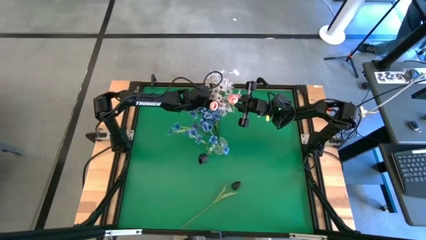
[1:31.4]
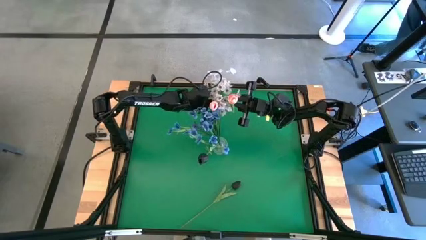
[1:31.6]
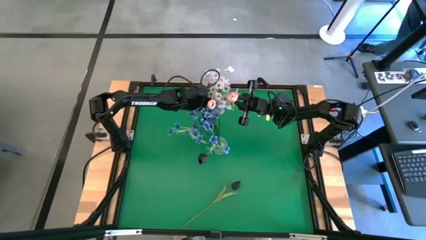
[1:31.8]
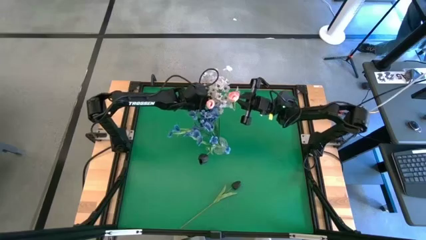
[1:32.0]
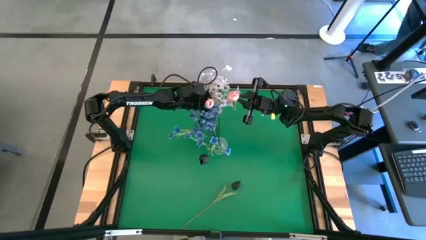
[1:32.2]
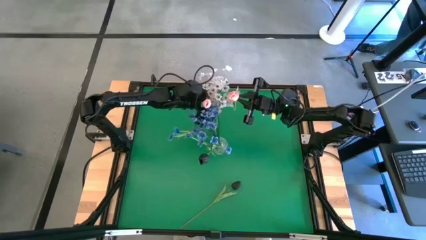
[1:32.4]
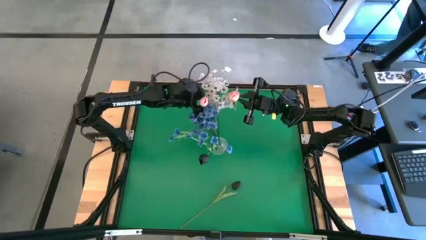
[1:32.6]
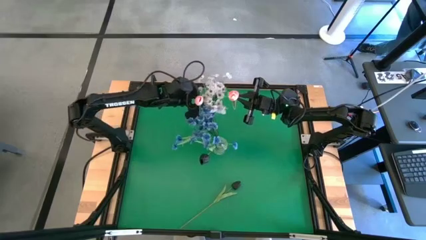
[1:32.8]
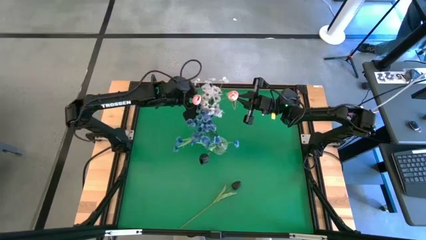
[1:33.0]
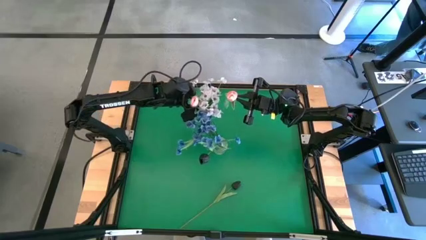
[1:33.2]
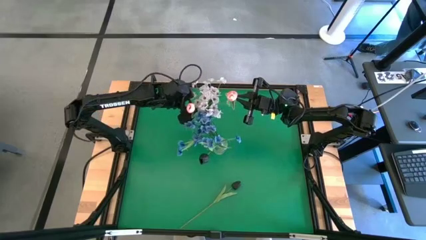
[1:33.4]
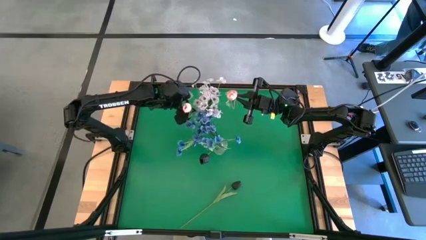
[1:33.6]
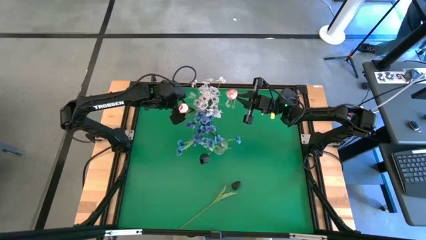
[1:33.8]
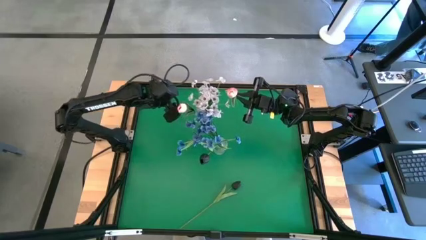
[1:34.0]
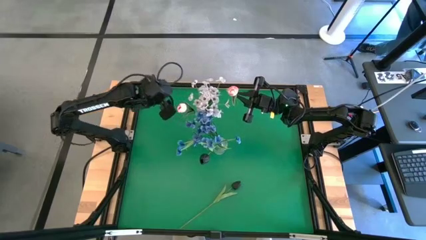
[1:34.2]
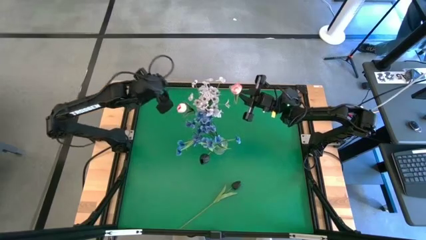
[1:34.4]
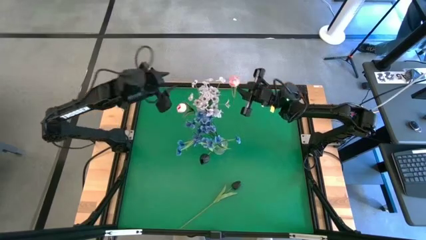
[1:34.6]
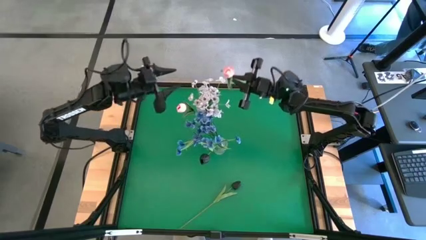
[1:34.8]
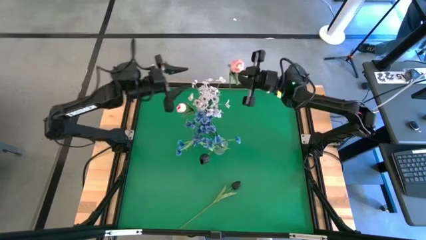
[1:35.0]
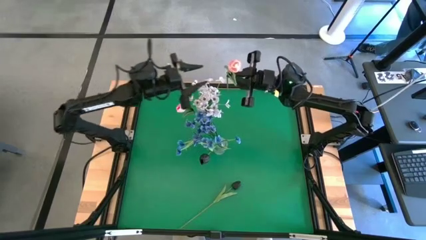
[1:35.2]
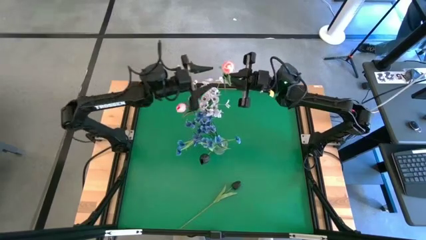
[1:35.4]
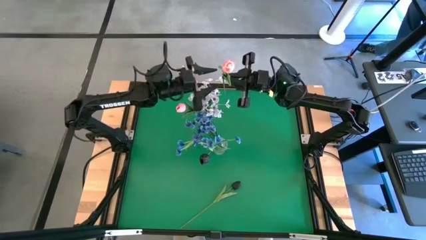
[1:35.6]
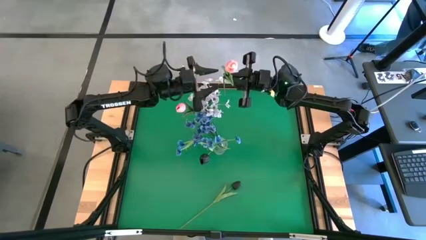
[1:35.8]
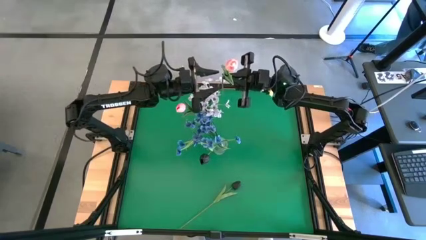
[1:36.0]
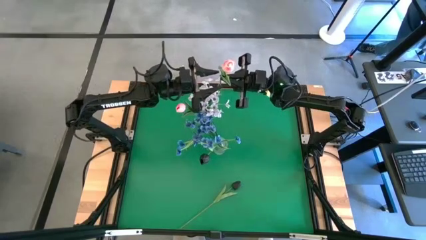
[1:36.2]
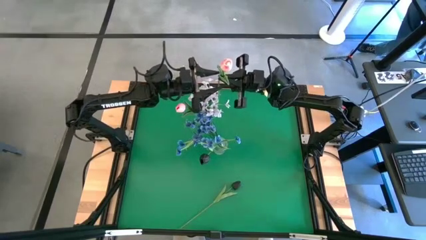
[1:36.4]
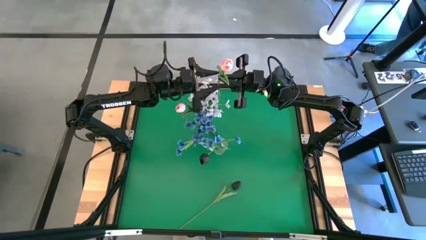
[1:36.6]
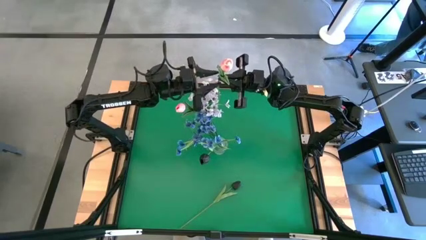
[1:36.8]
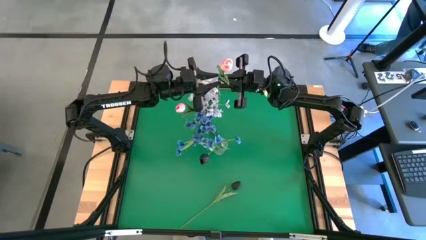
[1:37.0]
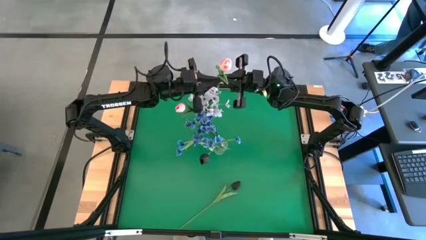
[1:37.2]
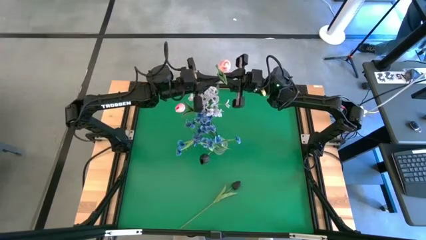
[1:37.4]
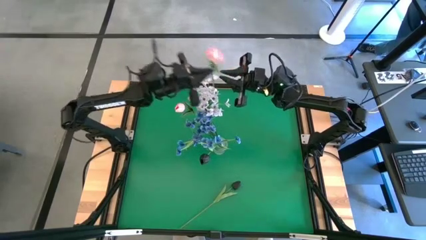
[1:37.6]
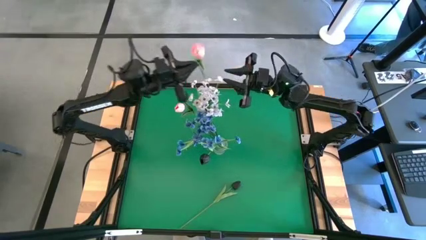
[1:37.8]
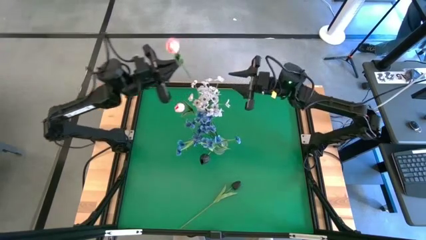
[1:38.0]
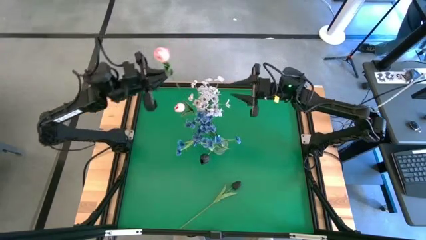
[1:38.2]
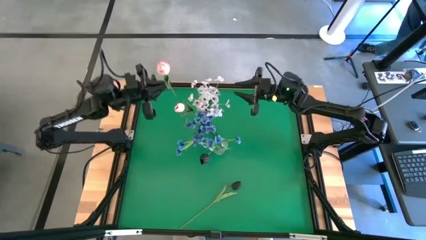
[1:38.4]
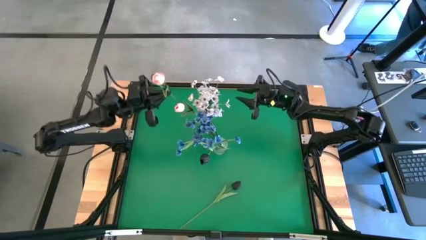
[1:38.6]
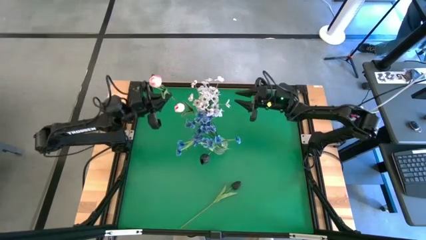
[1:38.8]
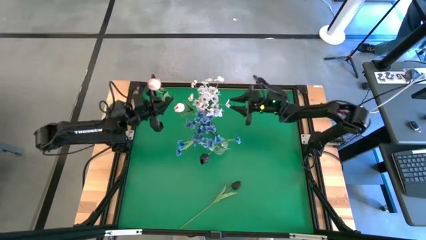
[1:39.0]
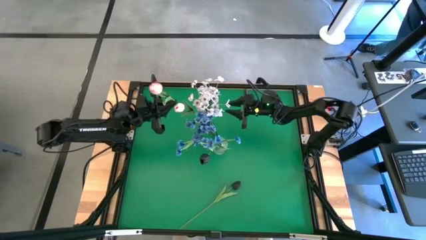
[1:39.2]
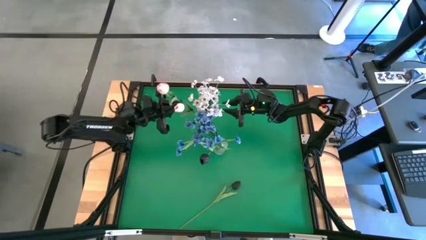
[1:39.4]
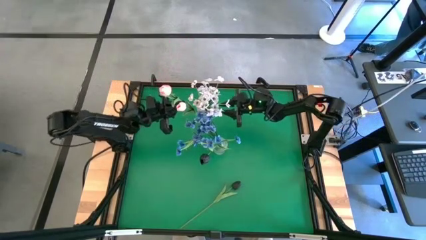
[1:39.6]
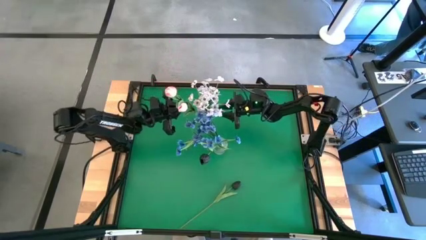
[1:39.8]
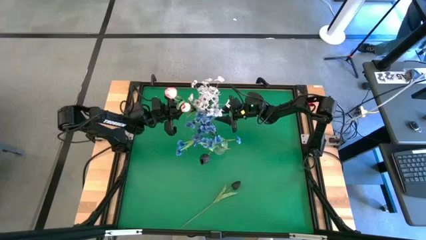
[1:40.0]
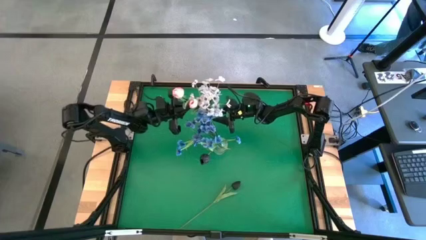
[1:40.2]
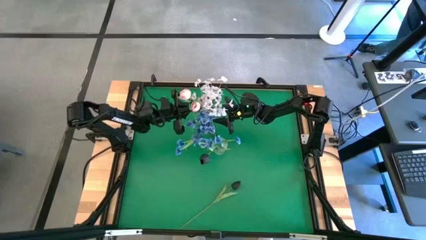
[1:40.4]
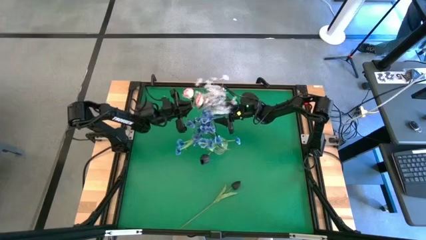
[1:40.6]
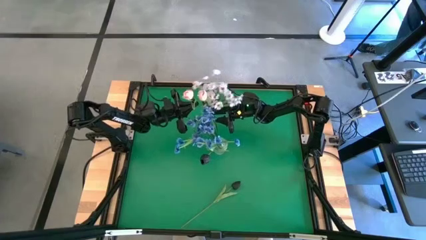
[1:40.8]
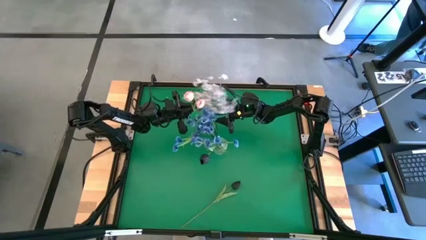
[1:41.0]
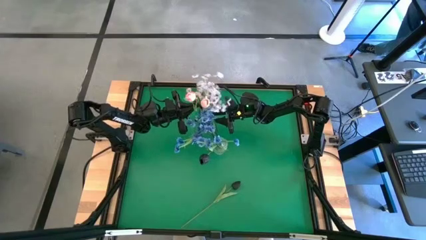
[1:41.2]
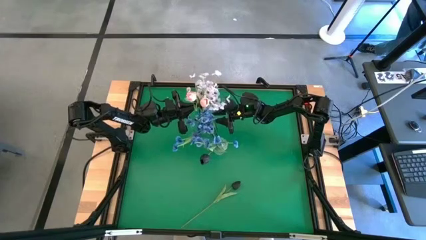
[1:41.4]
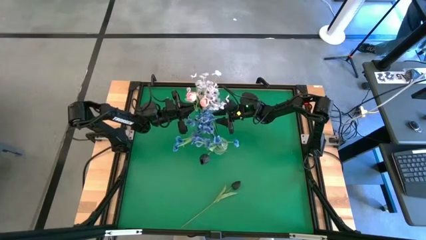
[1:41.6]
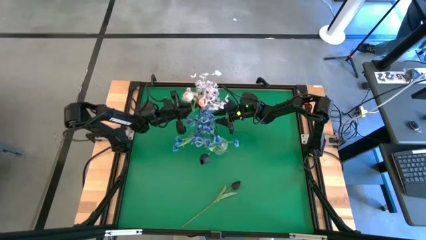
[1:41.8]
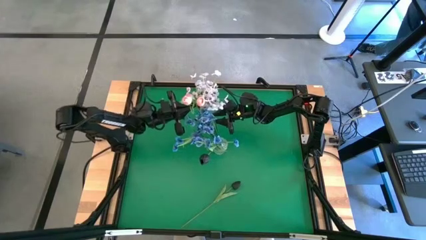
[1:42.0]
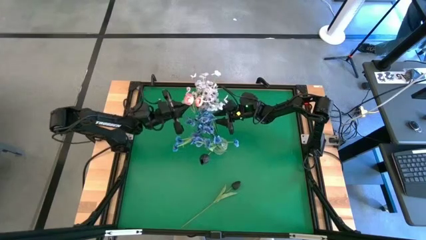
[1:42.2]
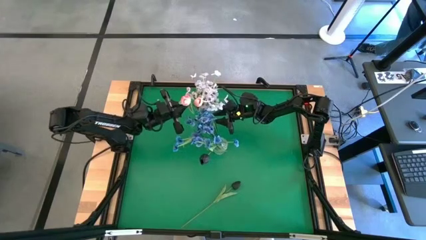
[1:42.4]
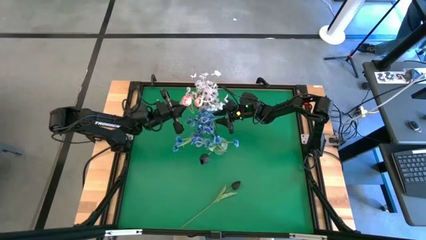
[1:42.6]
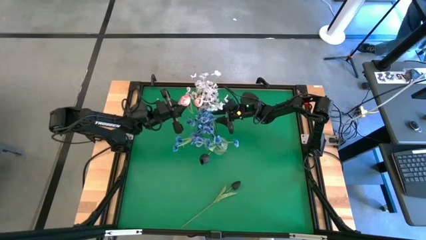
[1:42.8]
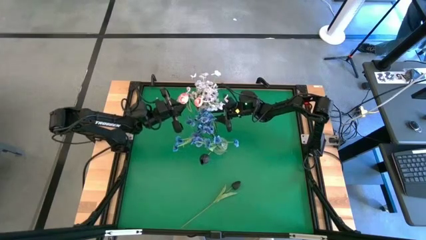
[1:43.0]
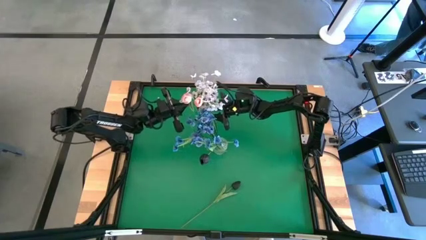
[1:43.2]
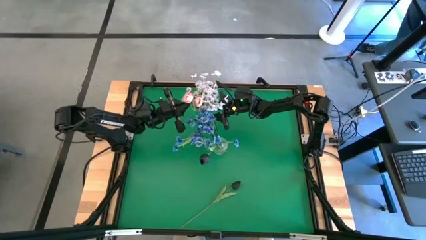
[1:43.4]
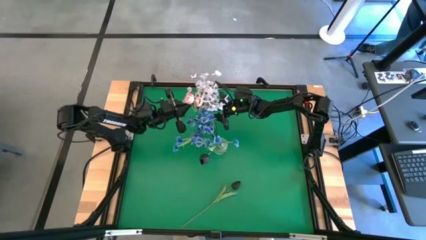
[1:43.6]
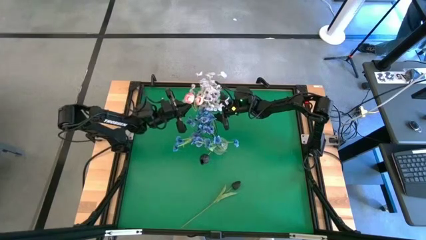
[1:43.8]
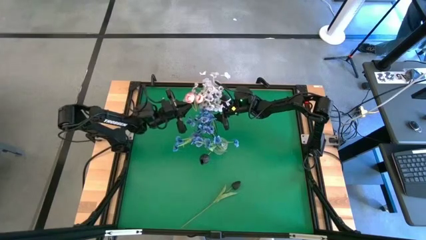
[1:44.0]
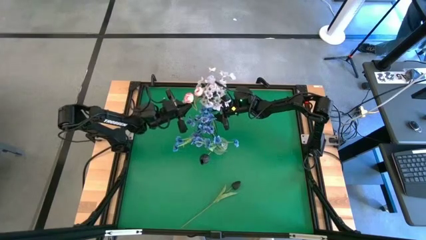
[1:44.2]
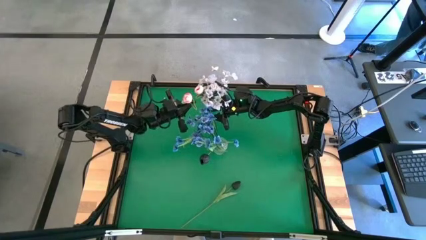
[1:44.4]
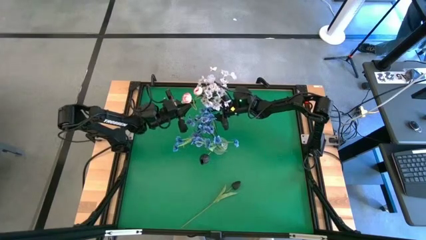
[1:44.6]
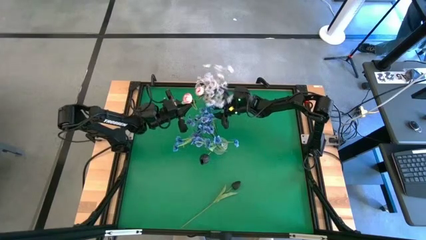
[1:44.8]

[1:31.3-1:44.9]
Task: Sort flowers into vase by color
Put the pink flowers into the blue transparent vase
